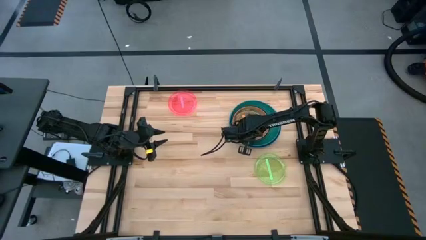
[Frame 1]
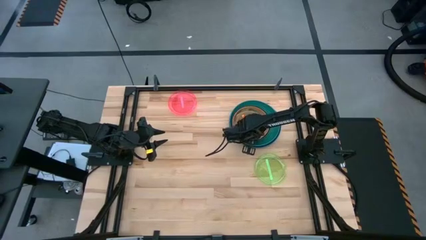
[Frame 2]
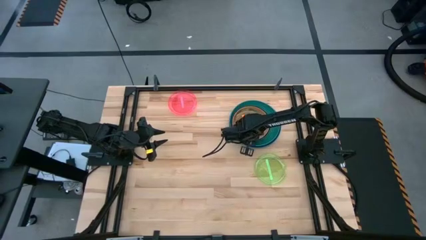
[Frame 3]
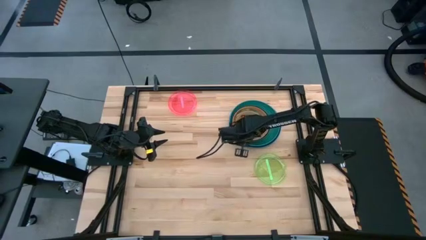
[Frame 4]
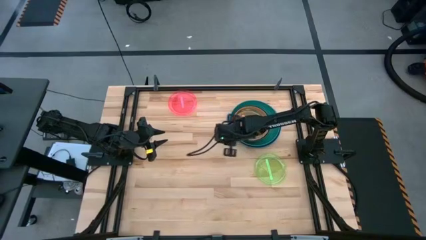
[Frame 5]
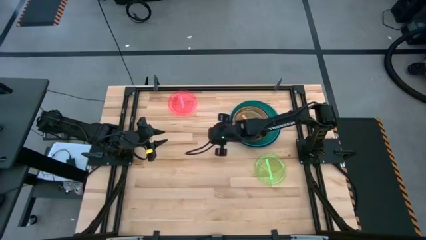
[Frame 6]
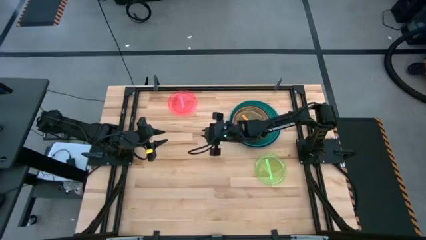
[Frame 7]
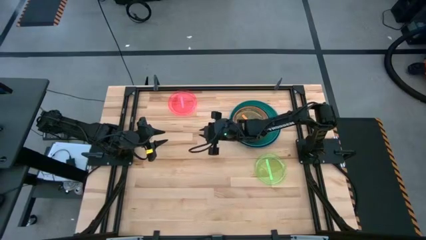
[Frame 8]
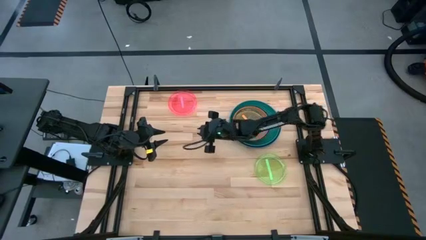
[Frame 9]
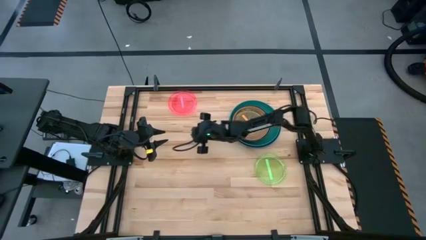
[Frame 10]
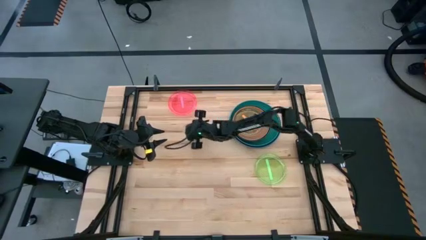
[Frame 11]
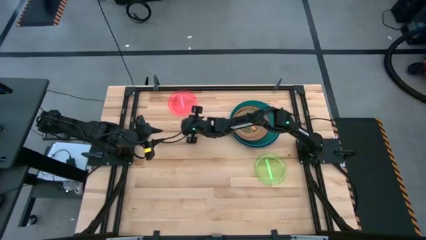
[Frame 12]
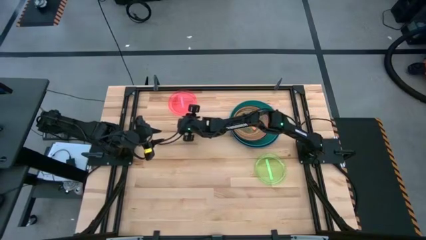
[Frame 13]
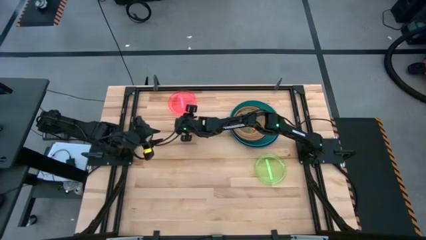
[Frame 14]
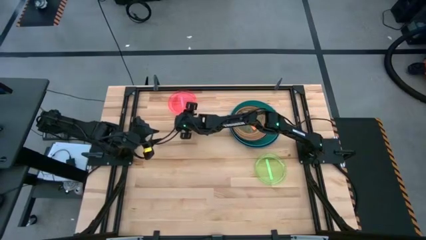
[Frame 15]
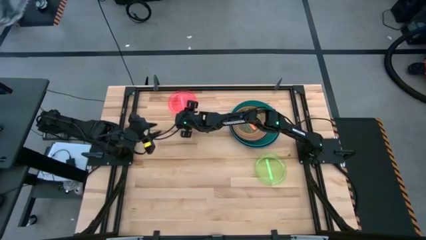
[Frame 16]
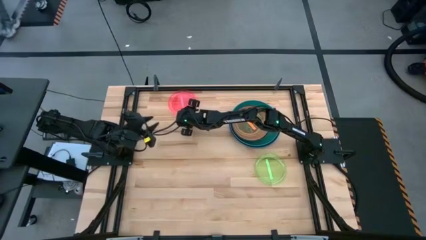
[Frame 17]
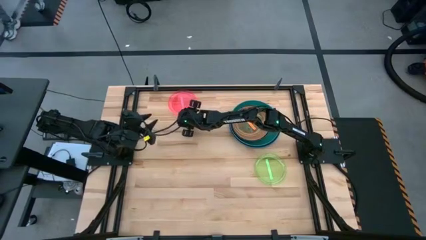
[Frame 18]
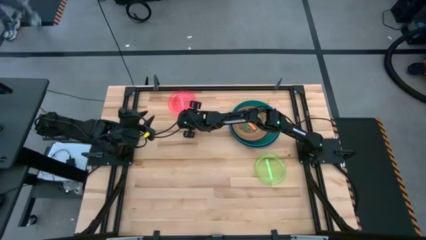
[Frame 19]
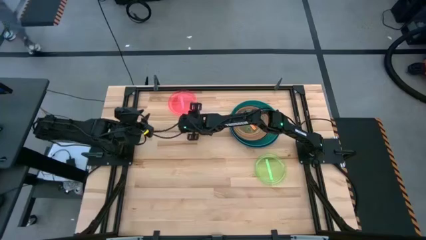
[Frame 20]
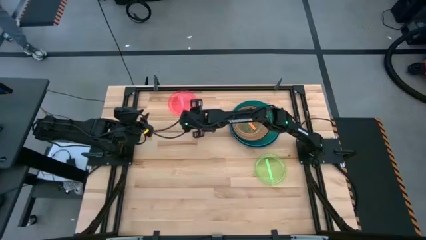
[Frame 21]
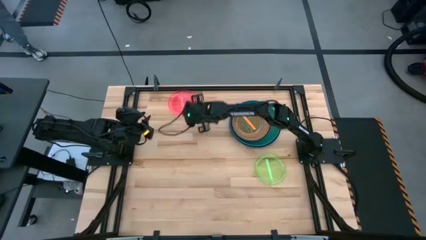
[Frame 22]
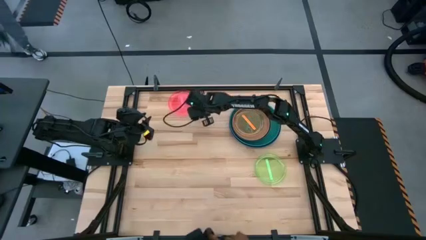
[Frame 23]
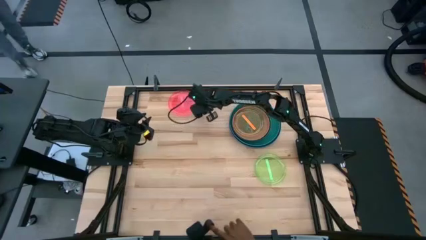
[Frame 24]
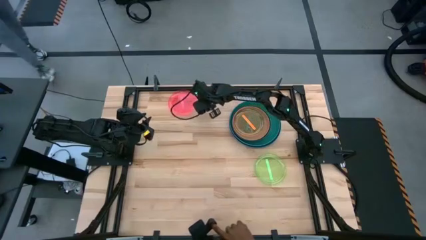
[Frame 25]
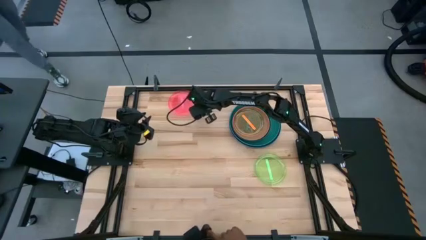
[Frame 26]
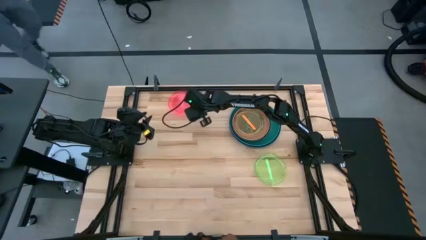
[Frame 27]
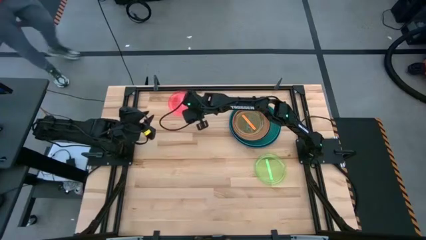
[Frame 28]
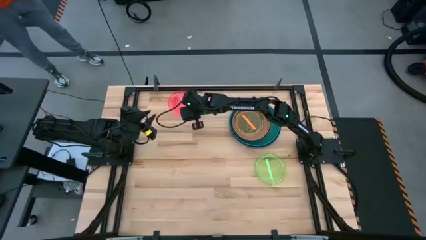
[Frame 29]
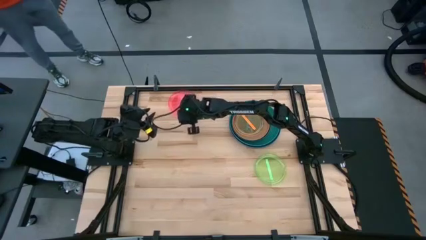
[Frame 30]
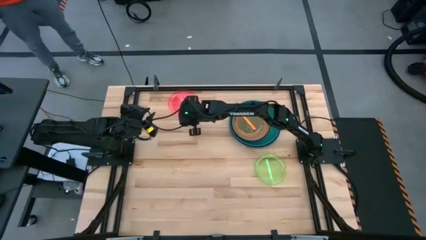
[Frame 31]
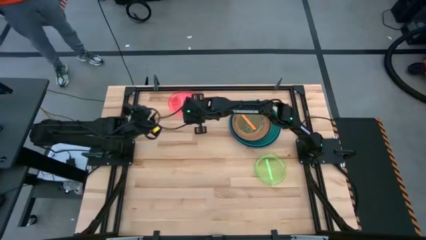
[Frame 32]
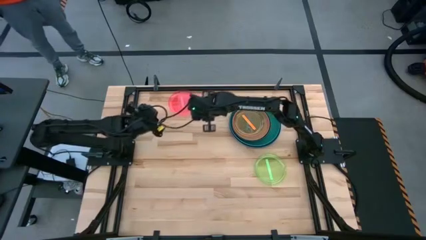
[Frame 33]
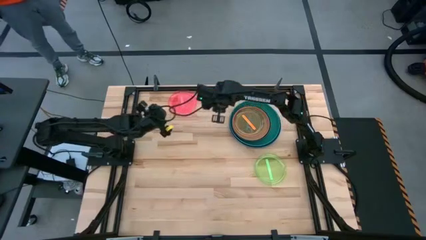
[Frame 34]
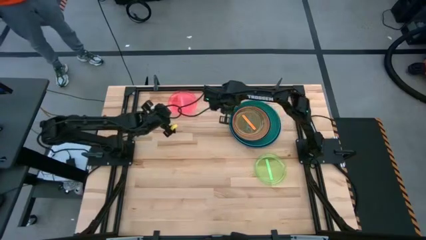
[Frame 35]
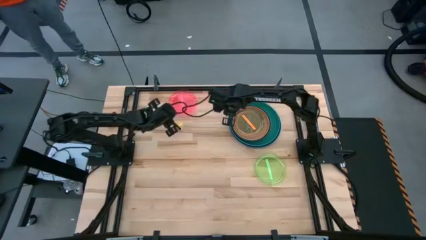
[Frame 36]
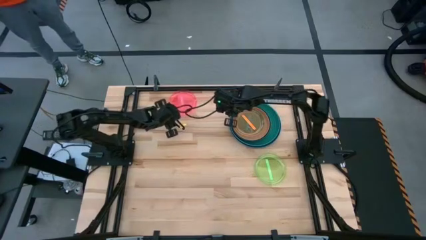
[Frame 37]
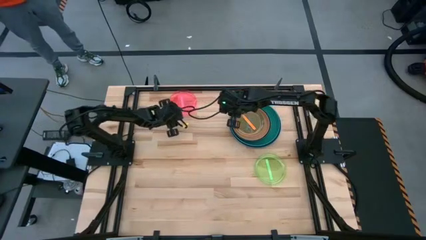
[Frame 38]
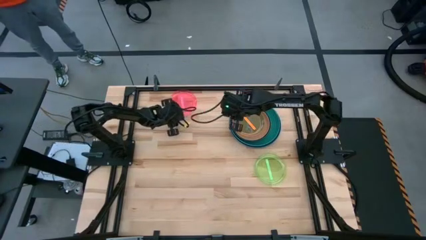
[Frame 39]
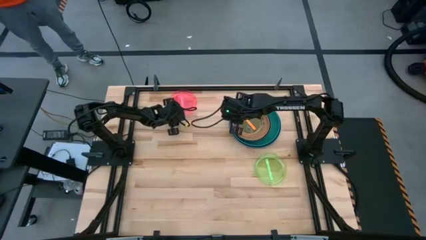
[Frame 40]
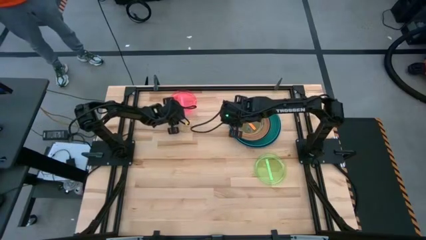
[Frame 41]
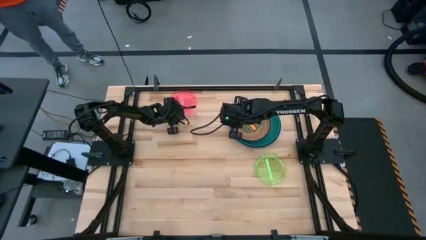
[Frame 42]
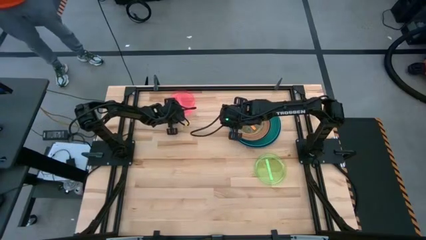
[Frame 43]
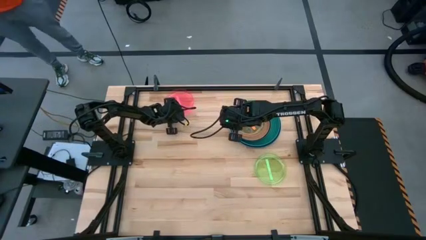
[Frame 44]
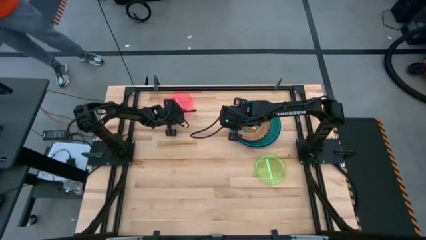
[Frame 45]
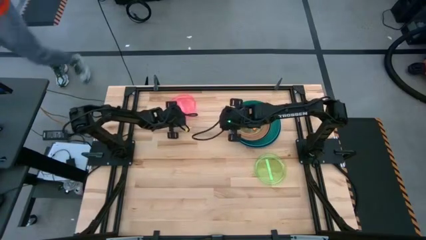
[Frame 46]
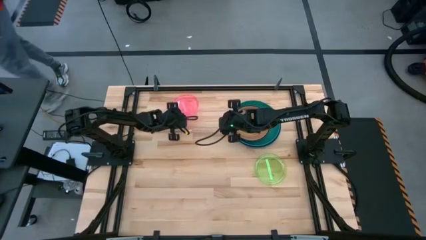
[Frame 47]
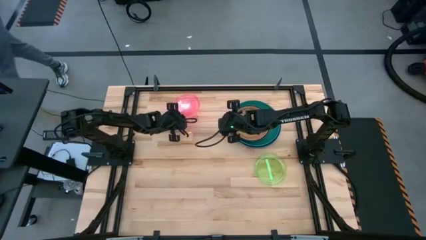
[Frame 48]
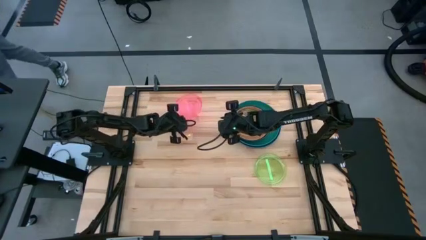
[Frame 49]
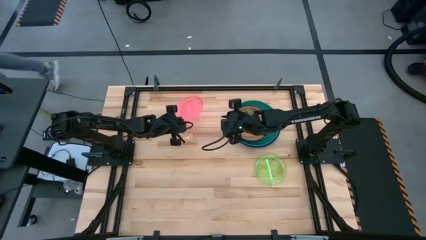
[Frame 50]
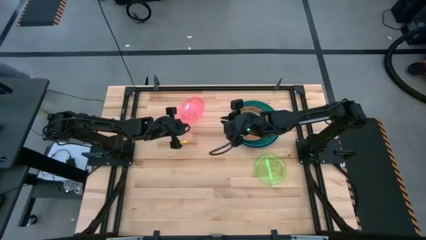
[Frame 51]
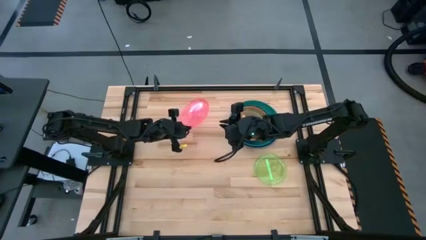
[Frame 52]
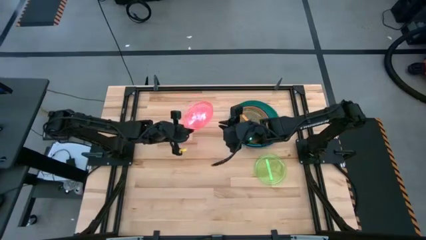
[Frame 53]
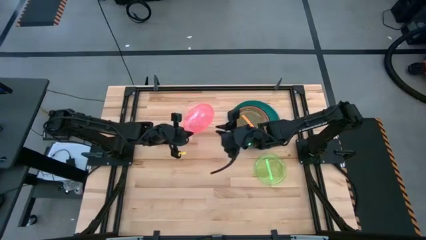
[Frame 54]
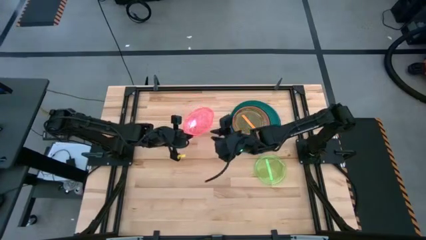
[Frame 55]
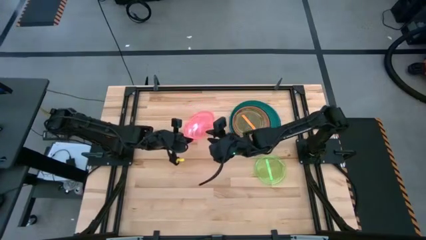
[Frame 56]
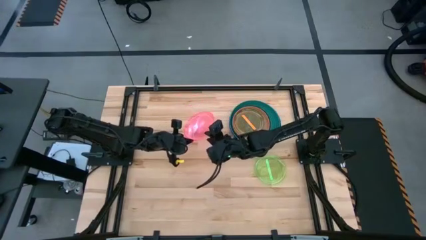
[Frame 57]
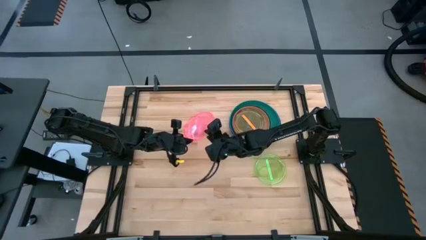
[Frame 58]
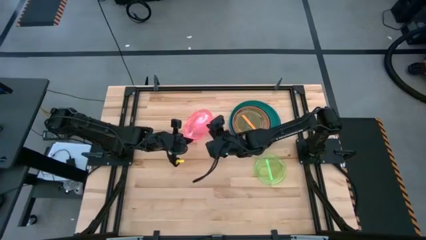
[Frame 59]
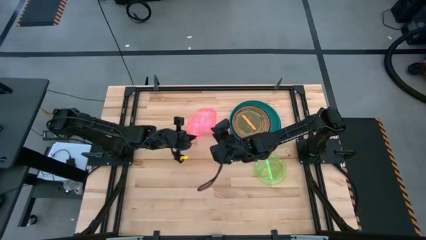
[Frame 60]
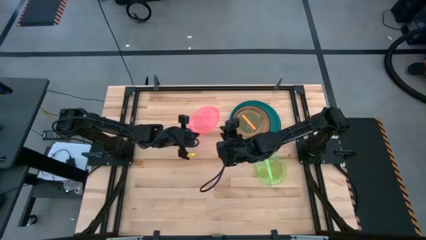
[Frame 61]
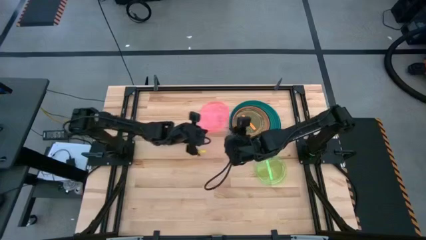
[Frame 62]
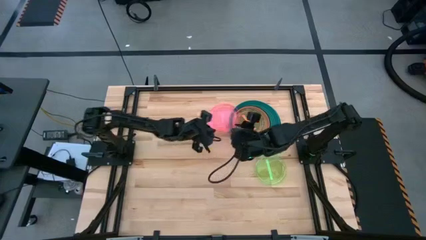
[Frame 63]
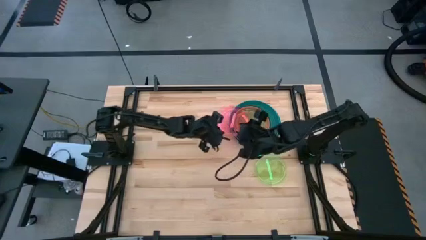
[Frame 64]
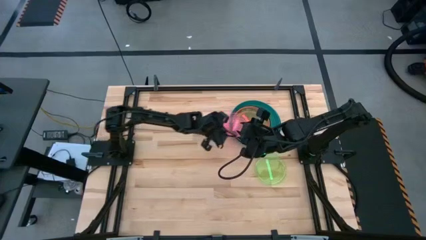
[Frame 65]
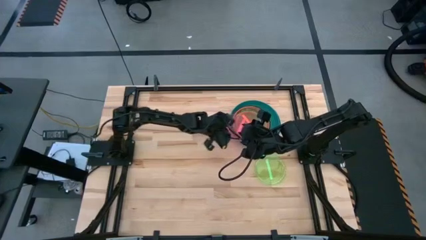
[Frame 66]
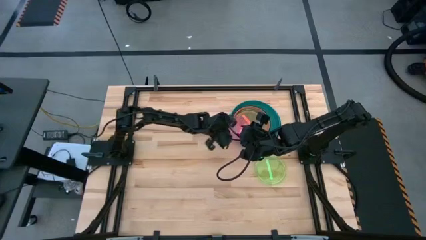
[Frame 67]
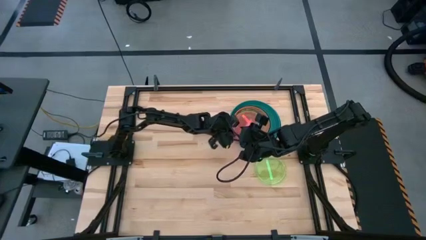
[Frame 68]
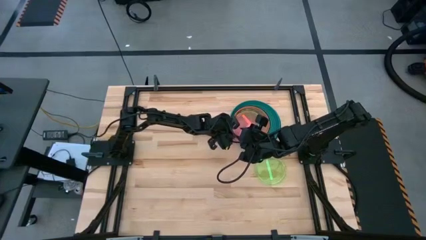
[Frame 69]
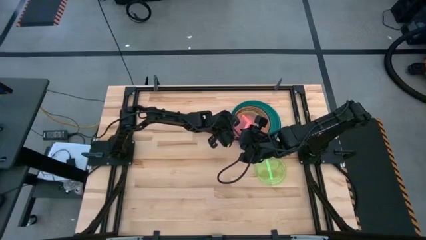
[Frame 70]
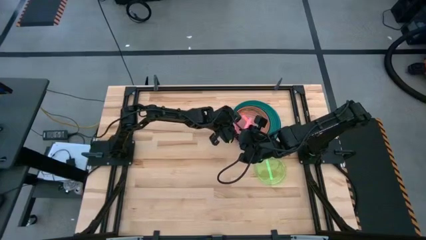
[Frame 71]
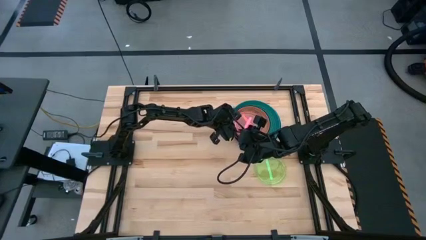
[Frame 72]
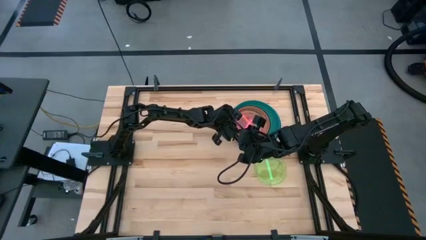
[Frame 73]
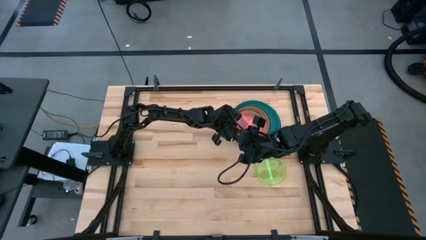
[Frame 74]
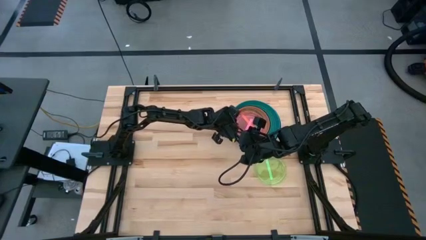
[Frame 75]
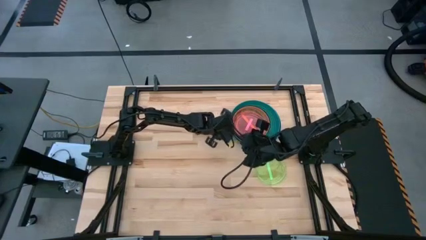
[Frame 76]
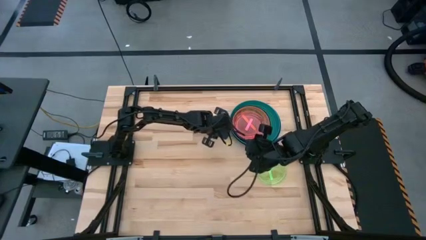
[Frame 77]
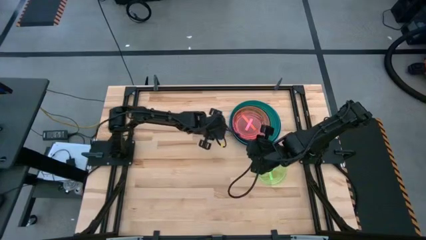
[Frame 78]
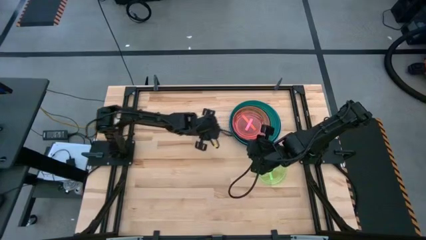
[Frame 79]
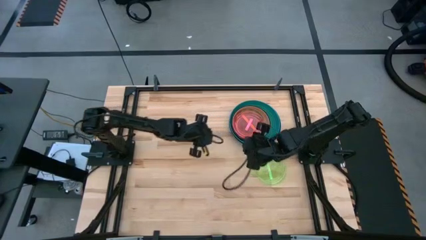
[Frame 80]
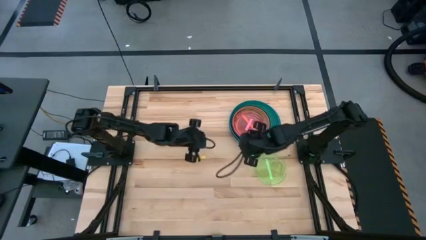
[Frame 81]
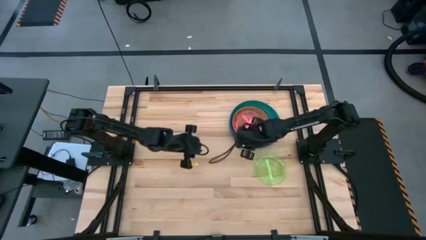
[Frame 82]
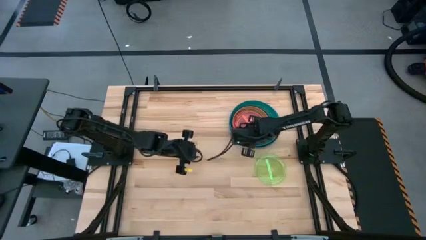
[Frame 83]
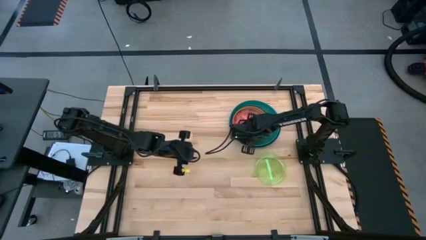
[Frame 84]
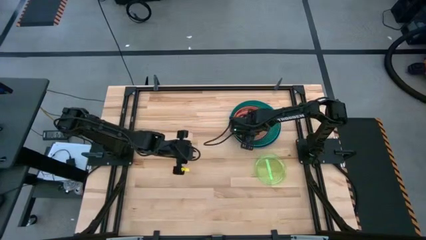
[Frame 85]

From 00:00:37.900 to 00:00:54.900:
Task: Stack plastic plates
Stack the pink plate on the orange plate

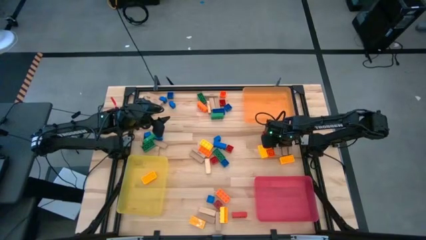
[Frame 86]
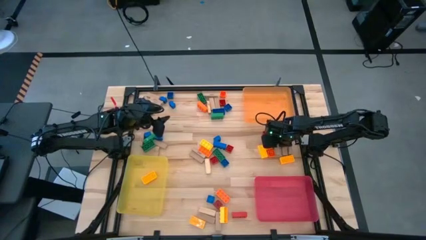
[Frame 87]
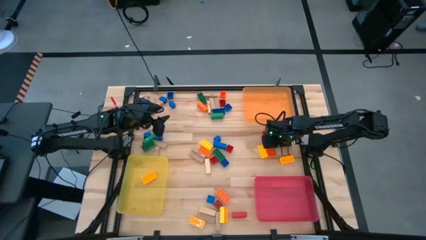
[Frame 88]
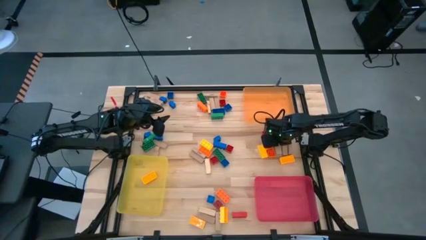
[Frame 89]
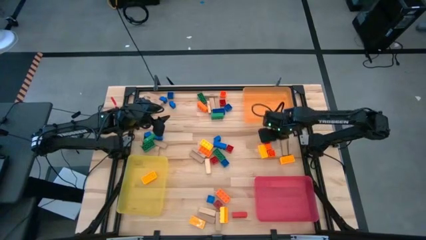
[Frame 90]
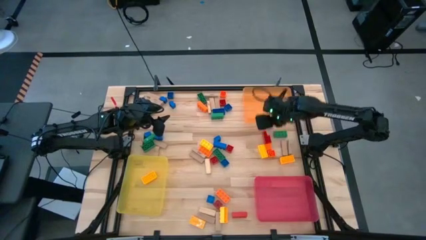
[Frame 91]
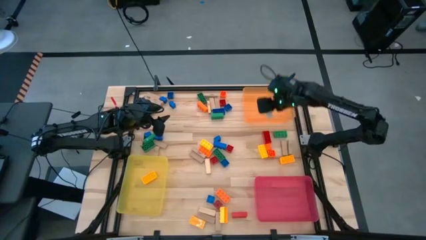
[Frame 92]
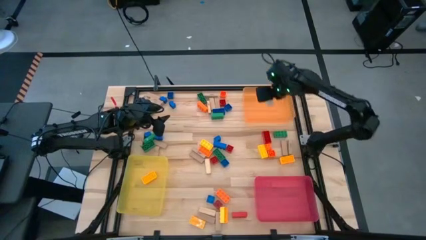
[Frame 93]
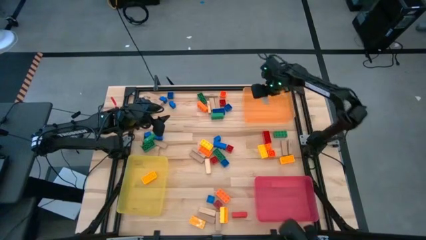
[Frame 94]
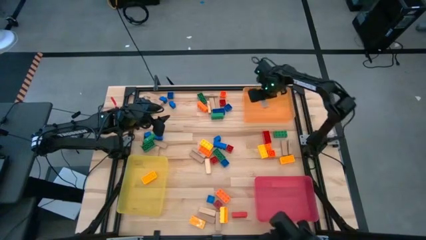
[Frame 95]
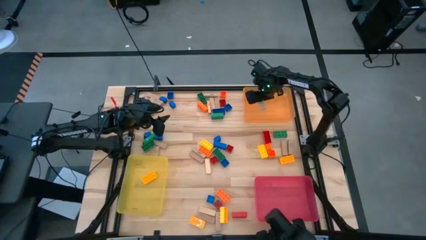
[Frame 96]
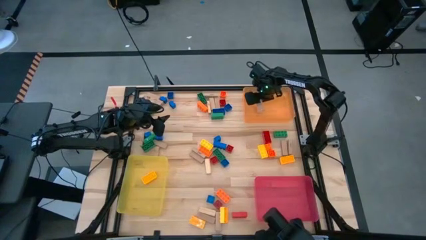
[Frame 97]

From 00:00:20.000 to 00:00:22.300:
Task: Sort blocks by size
Put the brown block into the orange bin
